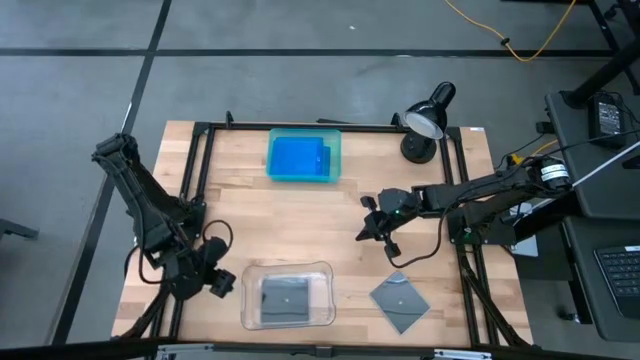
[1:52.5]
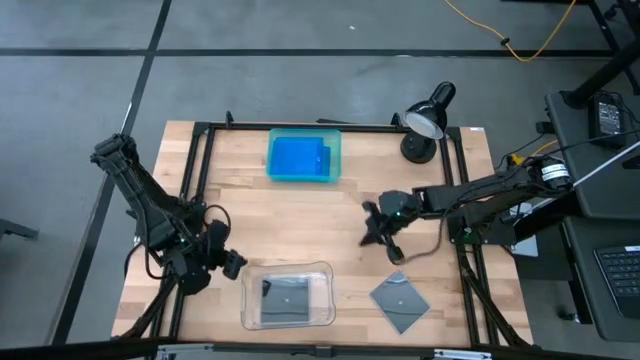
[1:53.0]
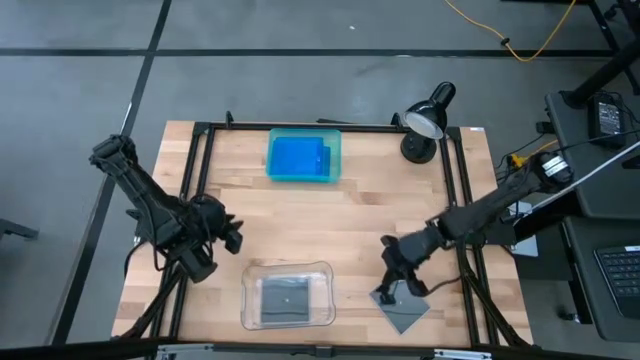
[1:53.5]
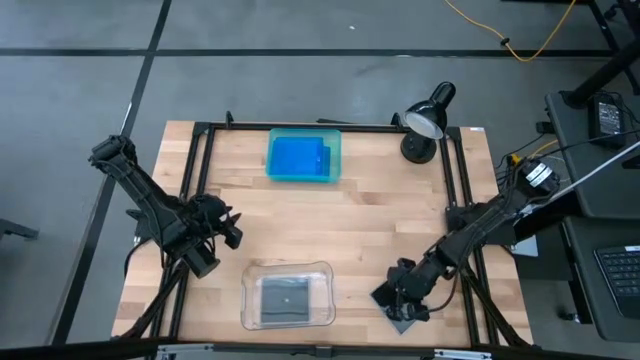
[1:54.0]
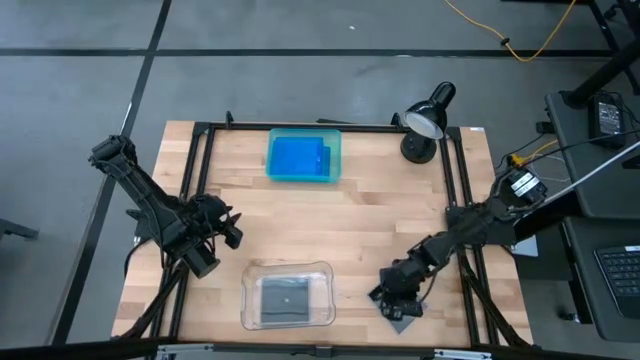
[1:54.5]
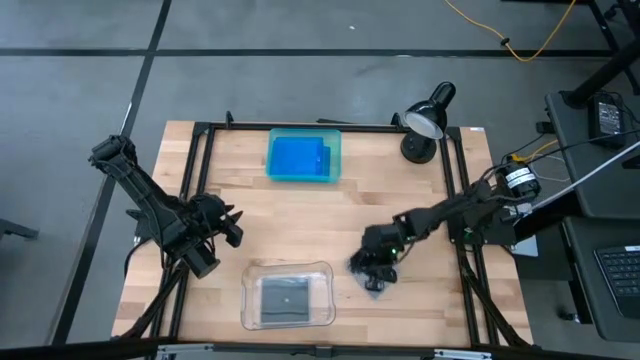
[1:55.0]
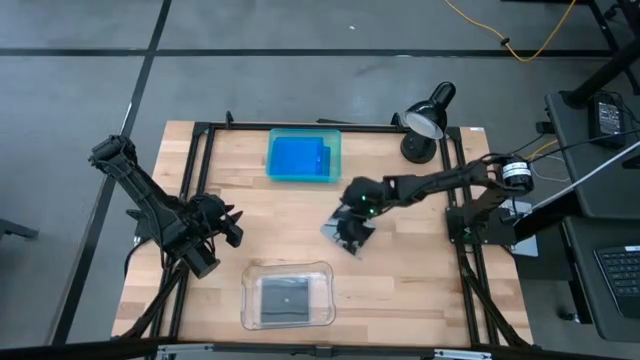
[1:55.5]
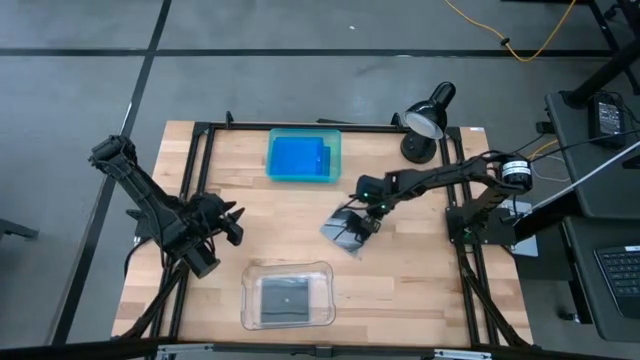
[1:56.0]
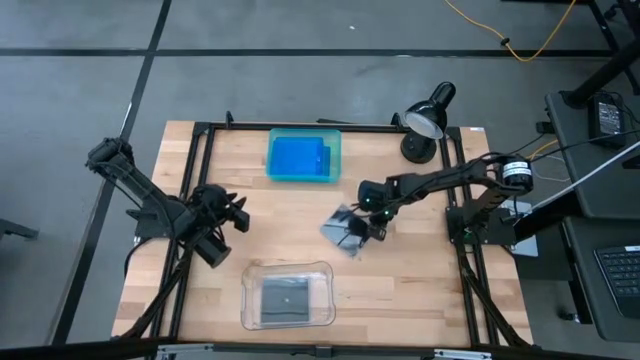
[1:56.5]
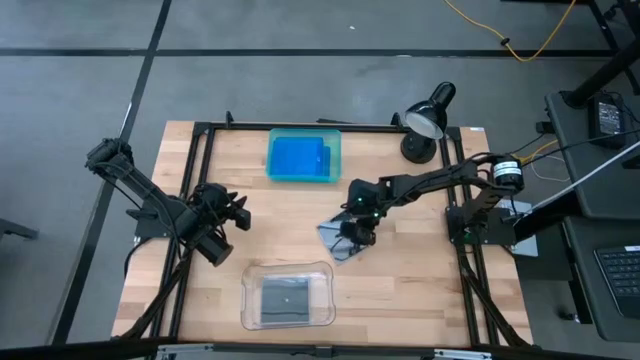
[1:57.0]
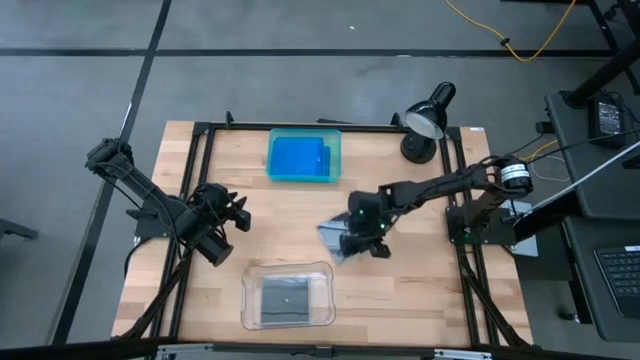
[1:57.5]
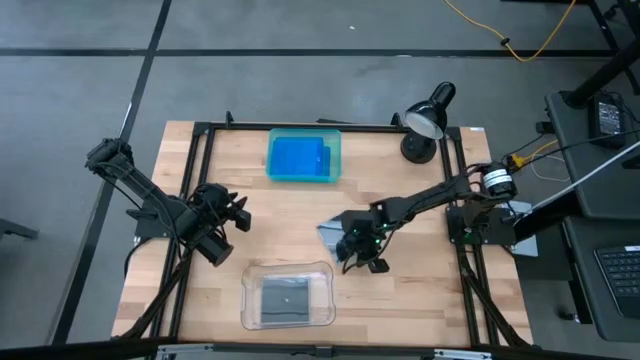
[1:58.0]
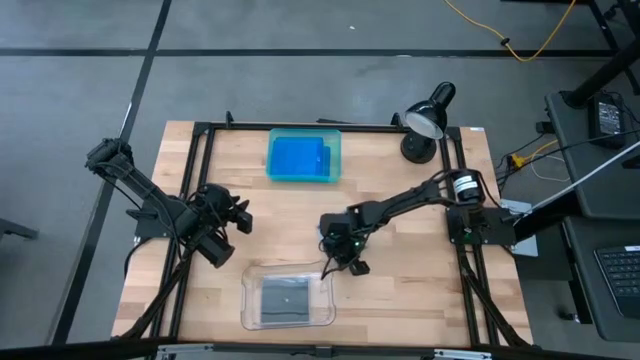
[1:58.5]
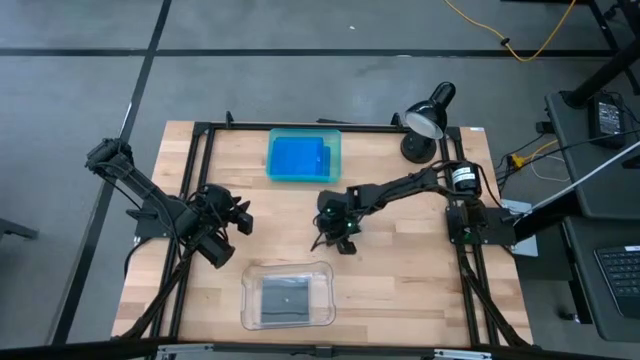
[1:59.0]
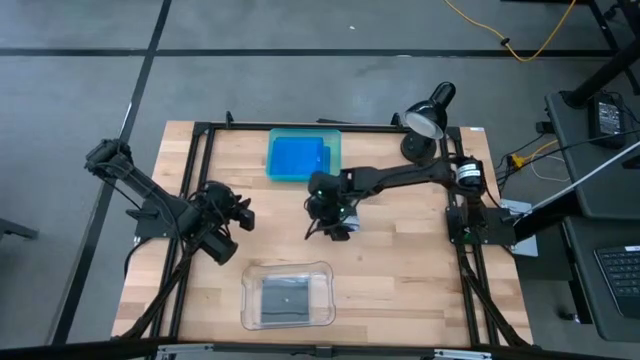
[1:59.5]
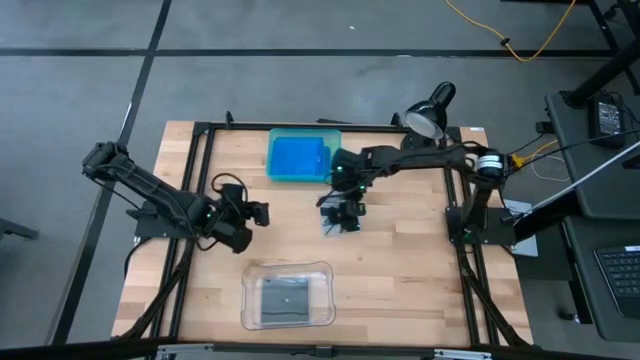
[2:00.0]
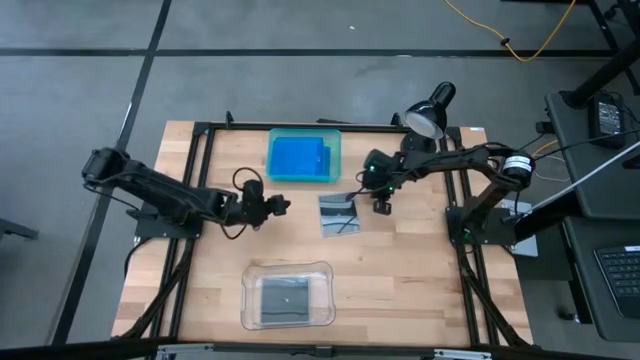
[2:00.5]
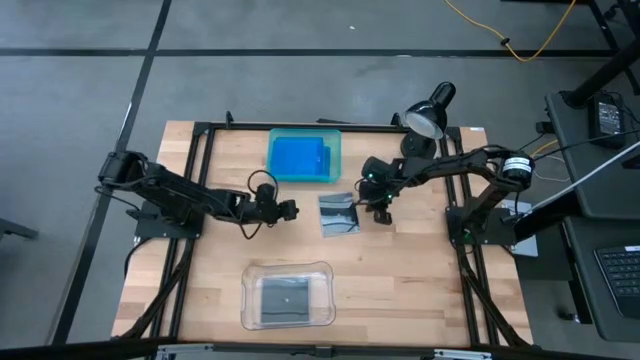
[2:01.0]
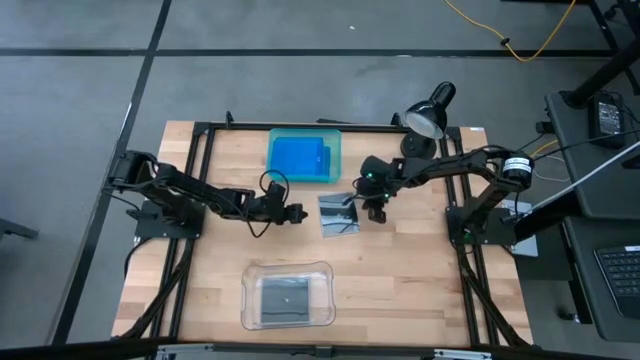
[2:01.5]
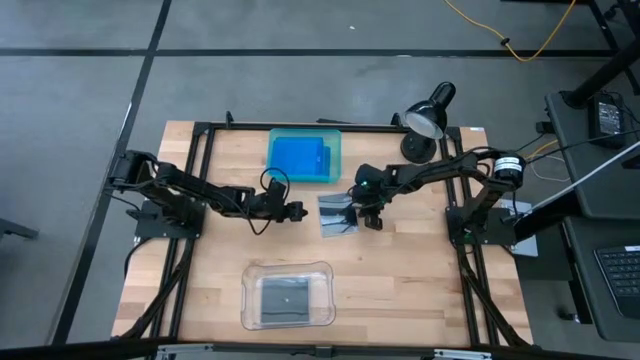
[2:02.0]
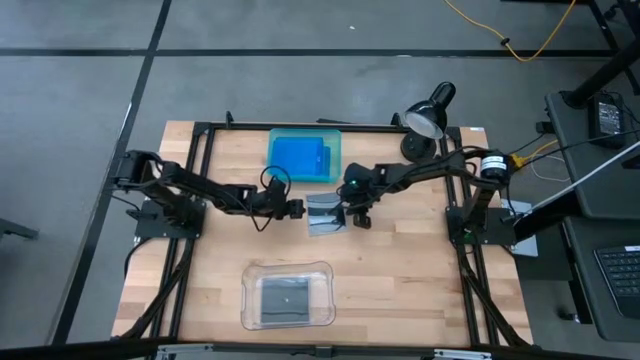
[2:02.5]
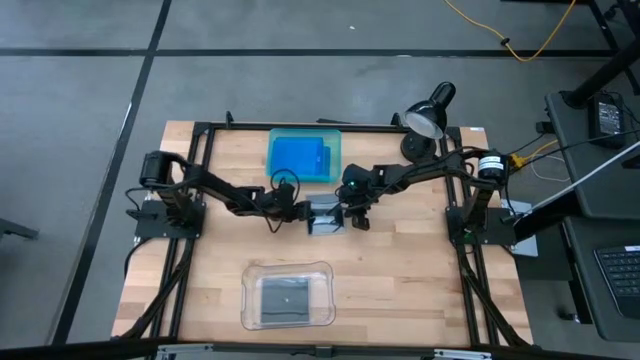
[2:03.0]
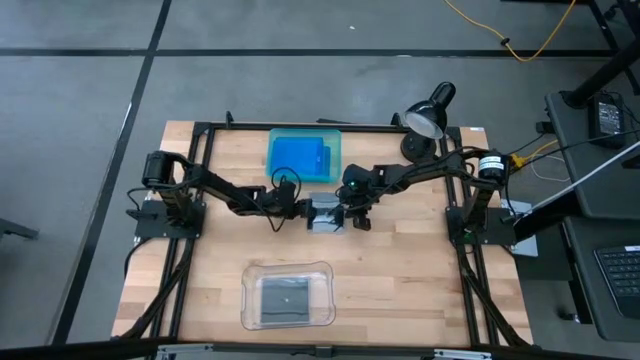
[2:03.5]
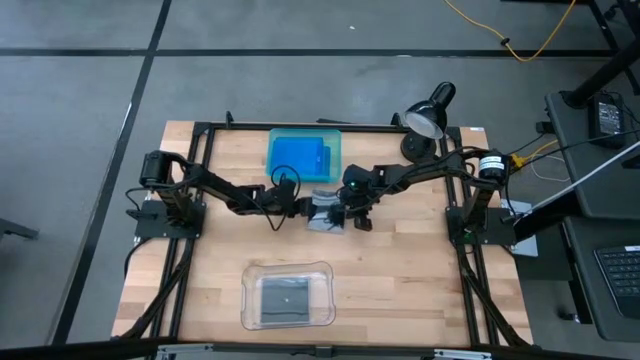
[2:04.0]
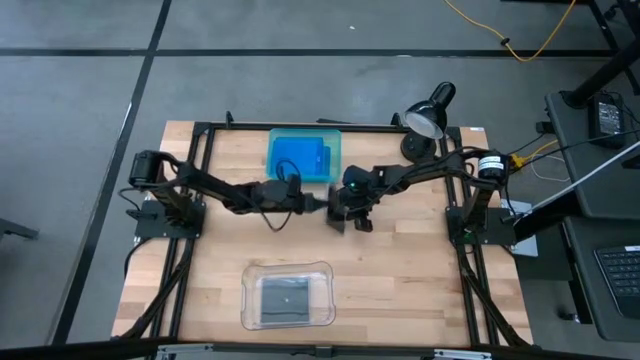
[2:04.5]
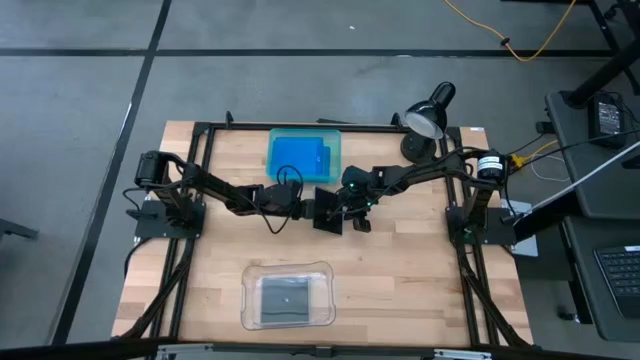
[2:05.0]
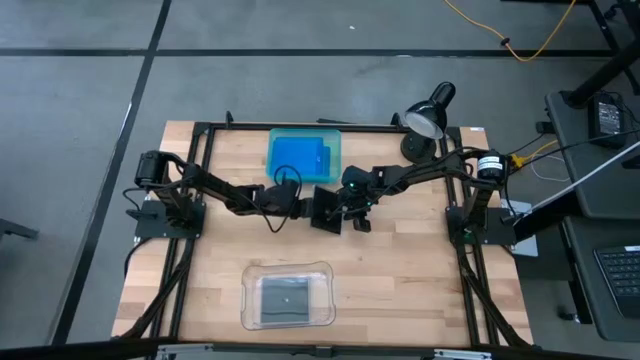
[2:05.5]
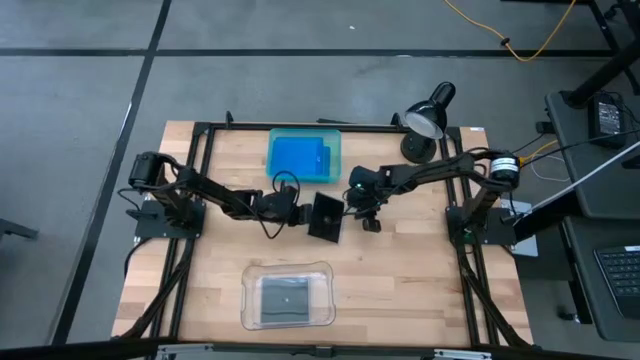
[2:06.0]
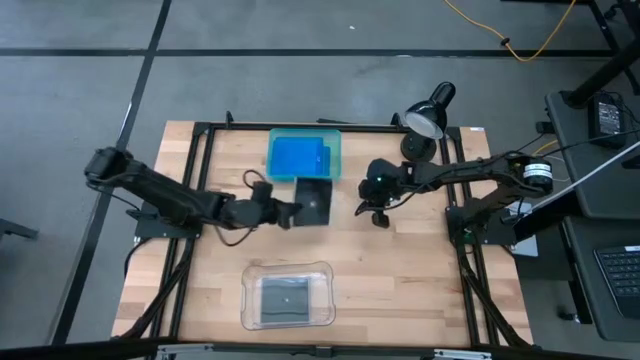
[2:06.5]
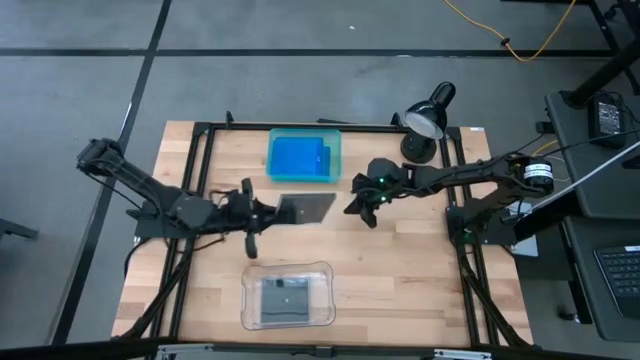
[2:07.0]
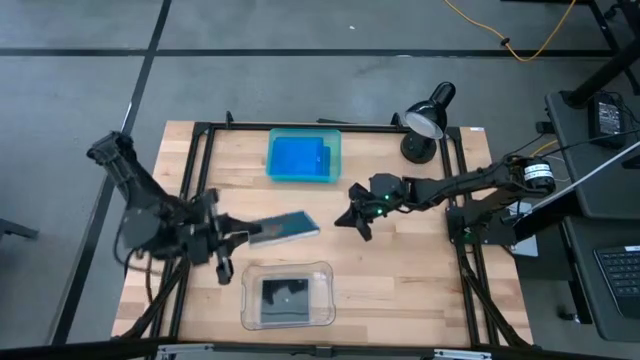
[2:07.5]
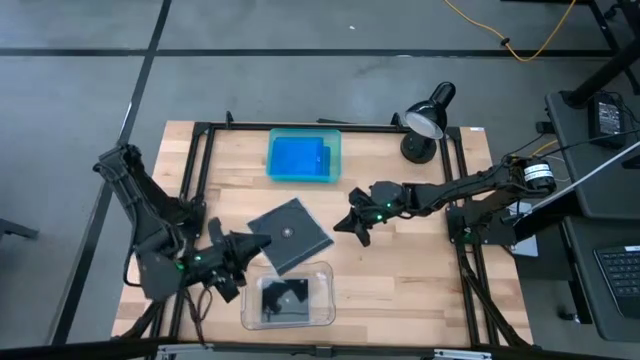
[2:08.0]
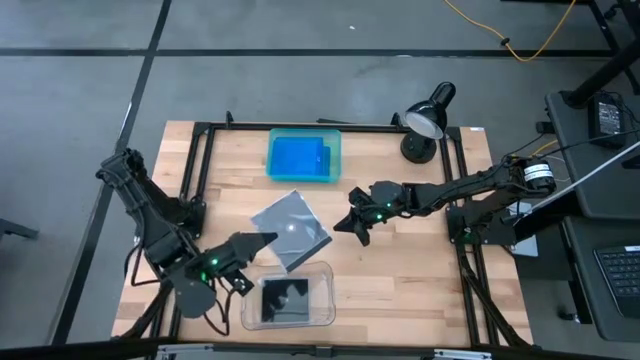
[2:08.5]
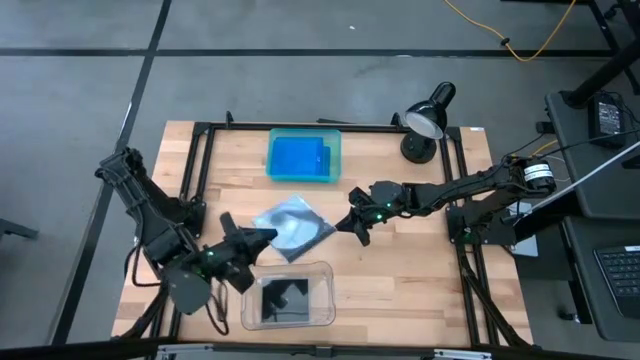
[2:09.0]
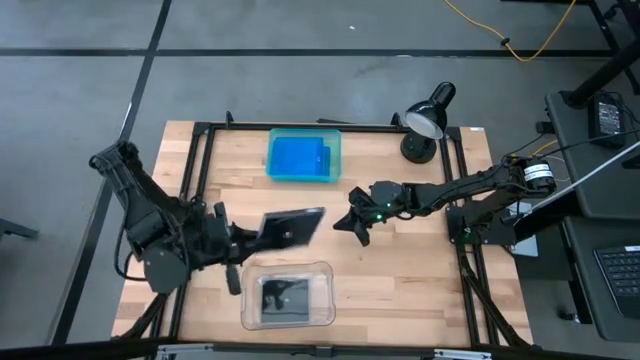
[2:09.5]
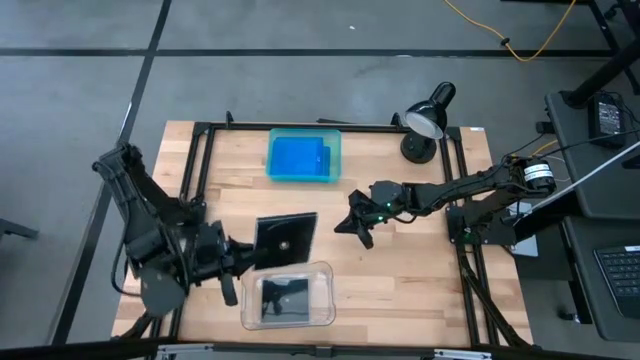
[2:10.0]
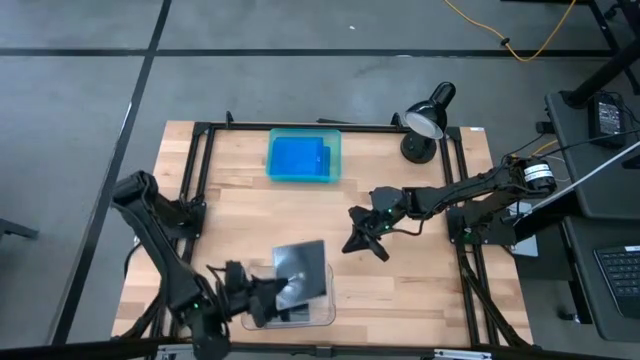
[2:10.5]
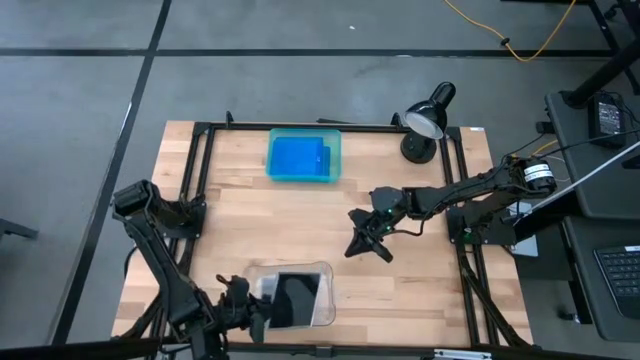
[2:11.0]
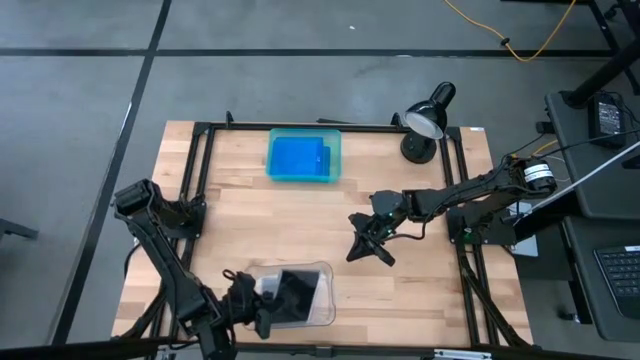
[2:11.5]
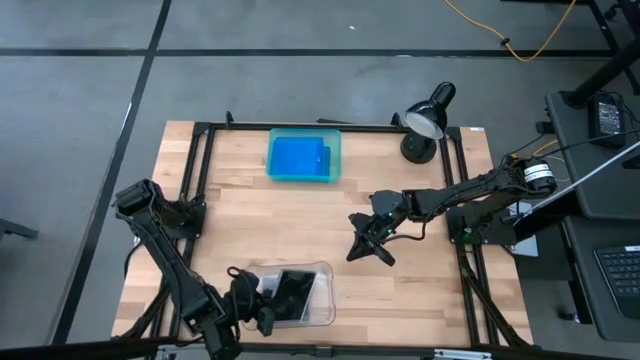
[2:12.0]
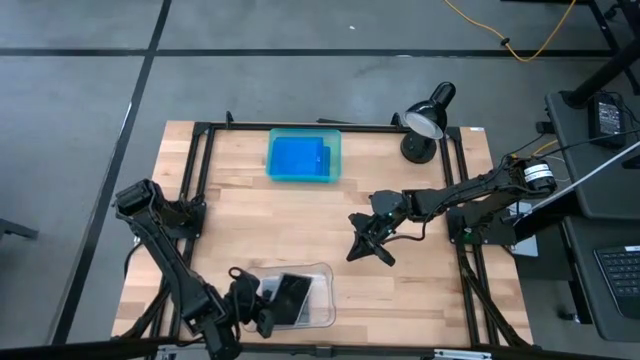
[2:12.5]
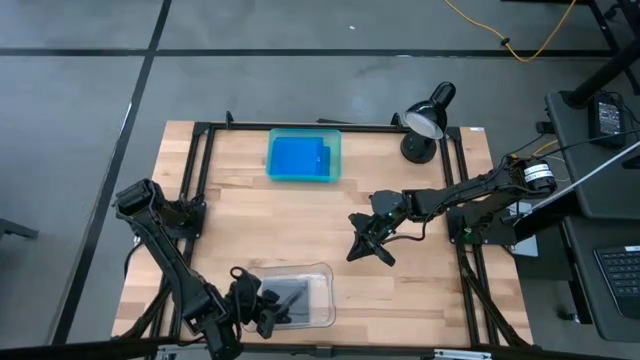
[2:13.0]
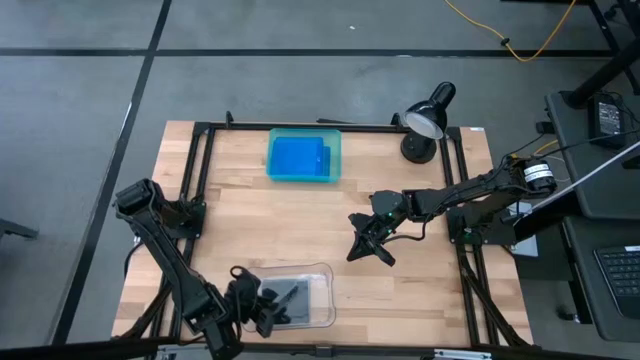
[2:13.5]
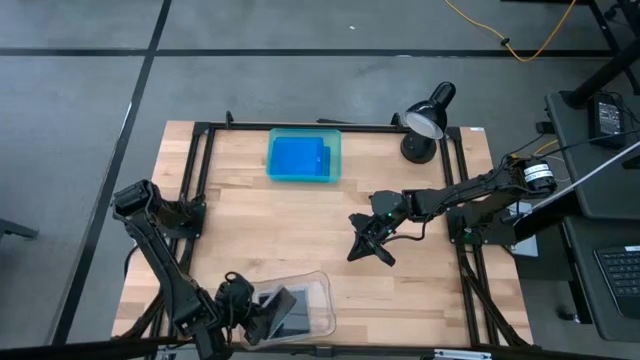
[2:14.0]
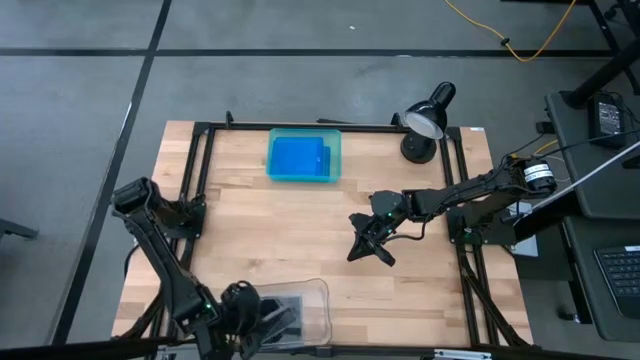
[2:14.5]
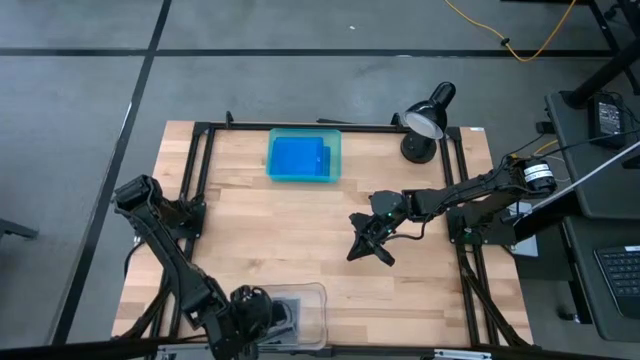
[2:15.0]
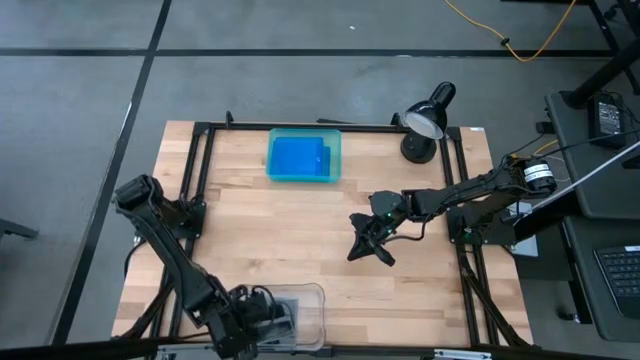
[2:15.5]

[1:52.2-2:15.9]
Task: Pick & place jewel cases by type
Put the black cd case into the transparent bin
